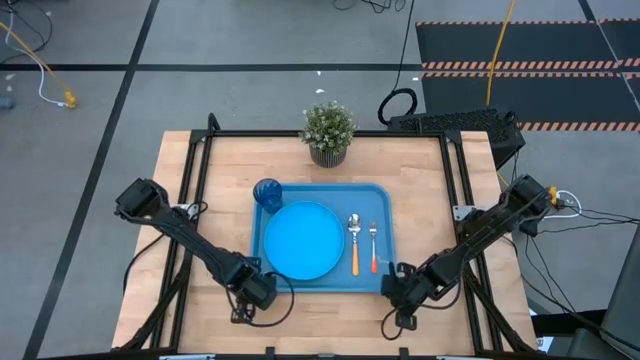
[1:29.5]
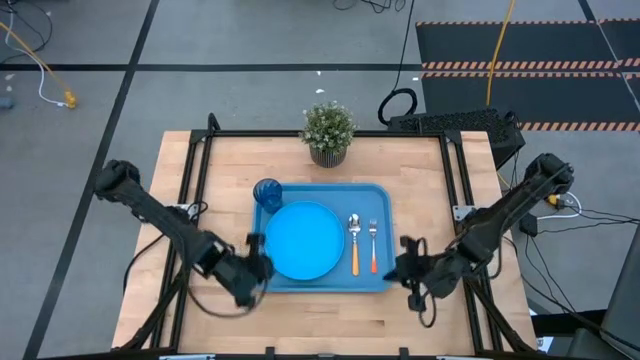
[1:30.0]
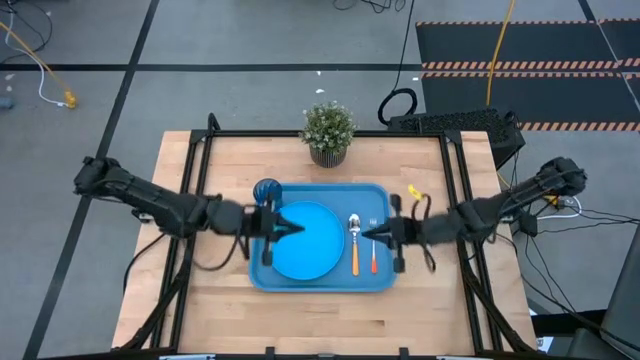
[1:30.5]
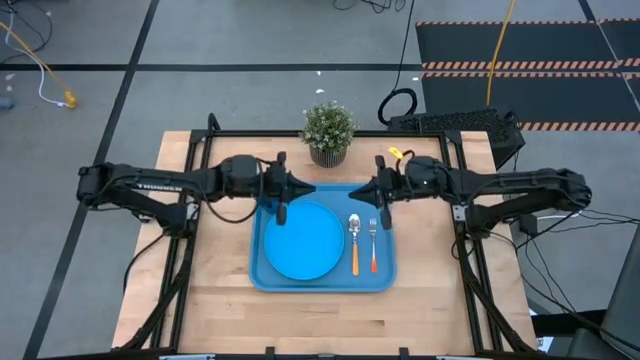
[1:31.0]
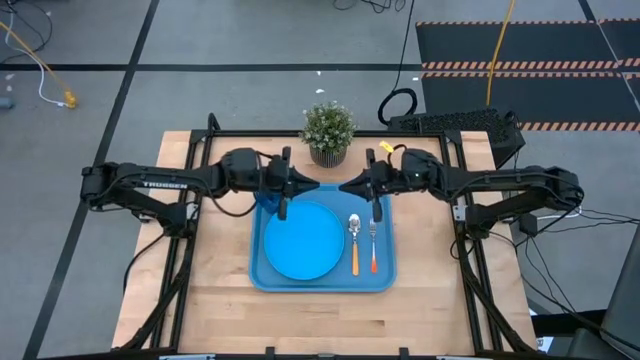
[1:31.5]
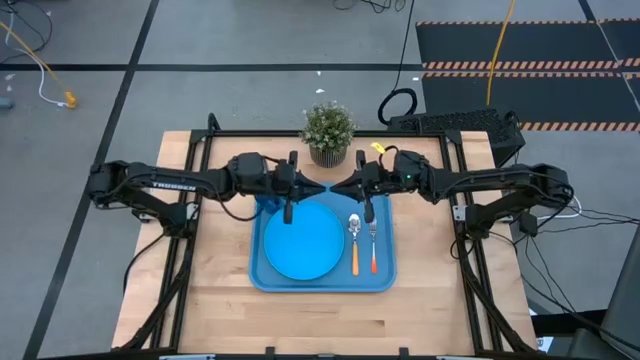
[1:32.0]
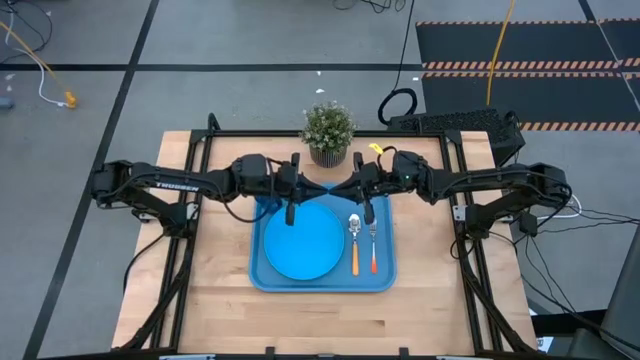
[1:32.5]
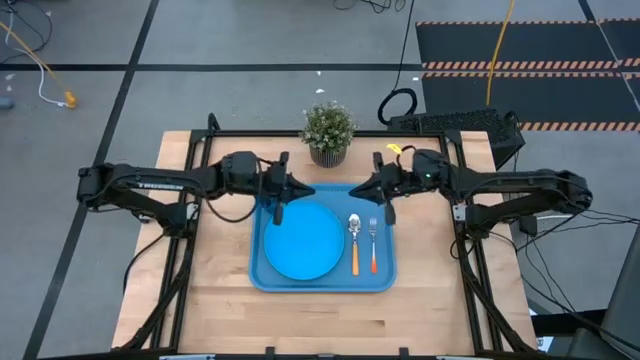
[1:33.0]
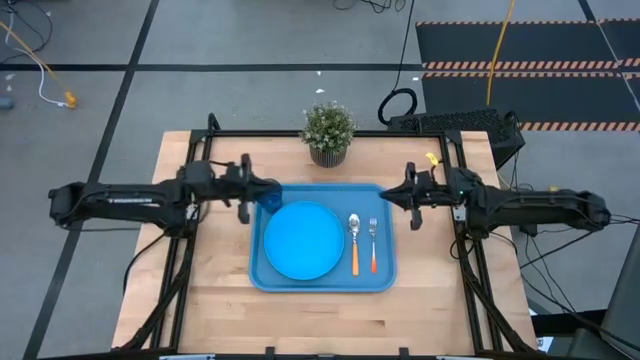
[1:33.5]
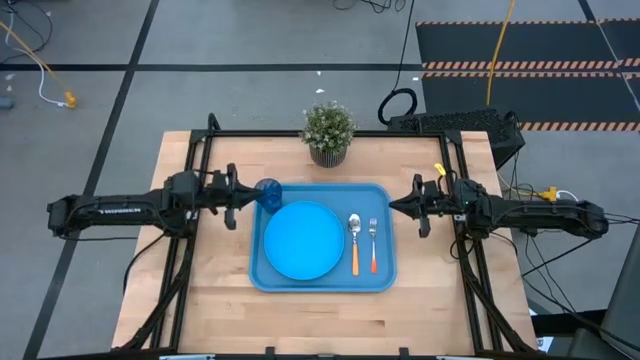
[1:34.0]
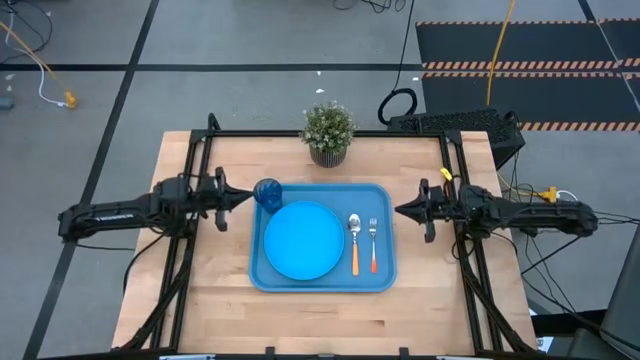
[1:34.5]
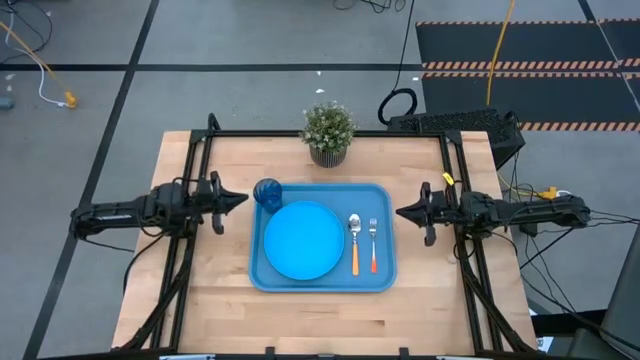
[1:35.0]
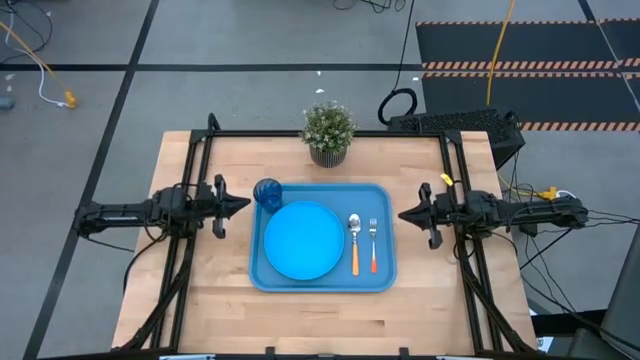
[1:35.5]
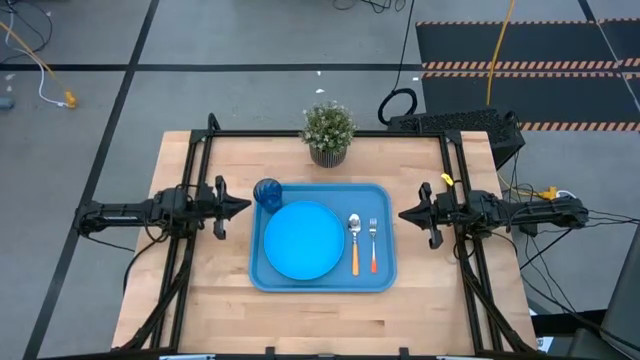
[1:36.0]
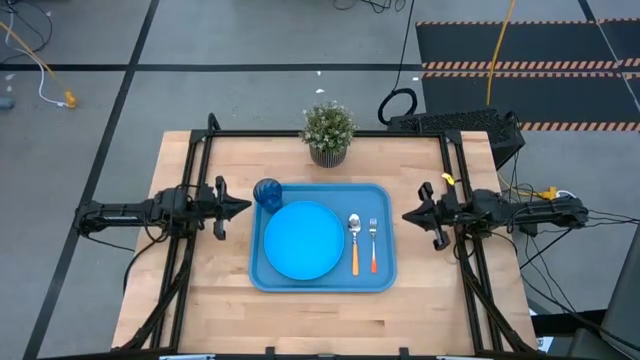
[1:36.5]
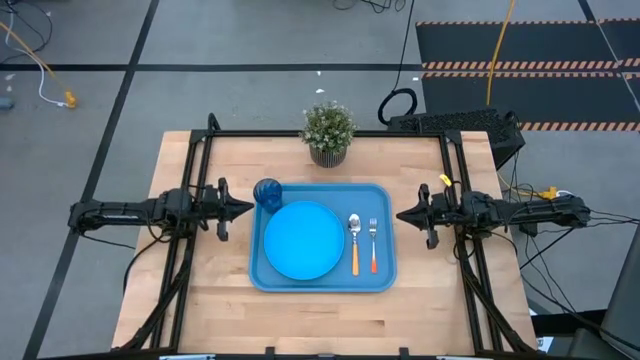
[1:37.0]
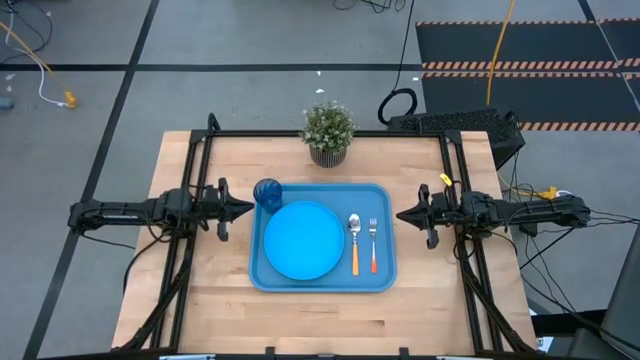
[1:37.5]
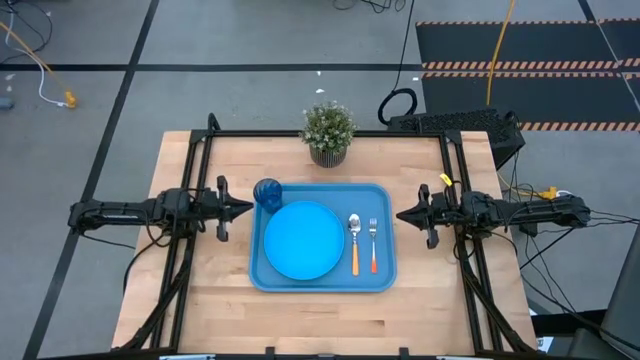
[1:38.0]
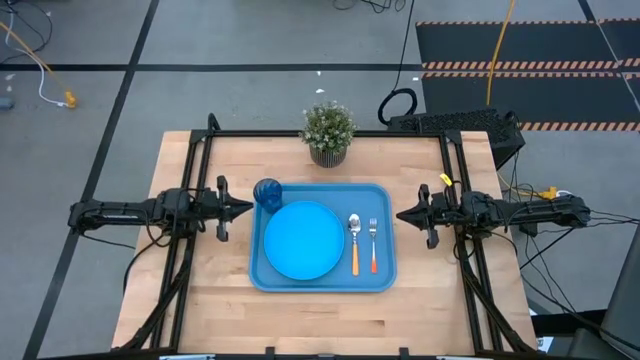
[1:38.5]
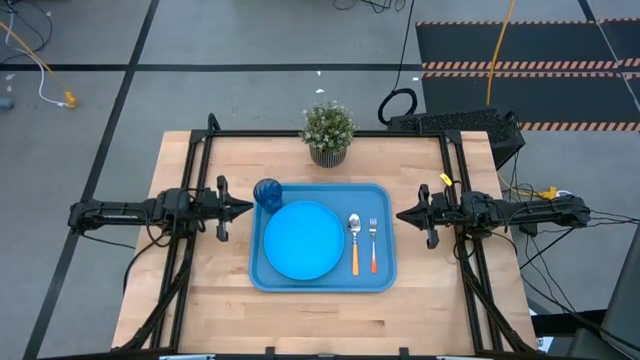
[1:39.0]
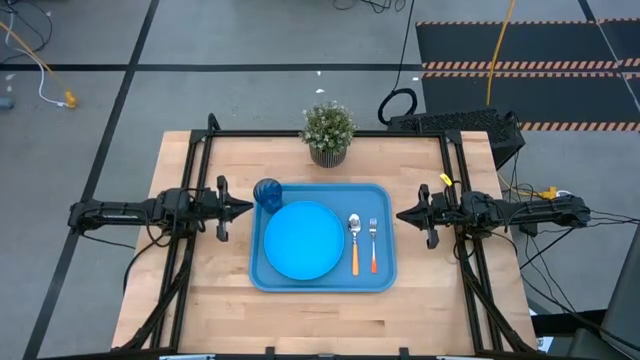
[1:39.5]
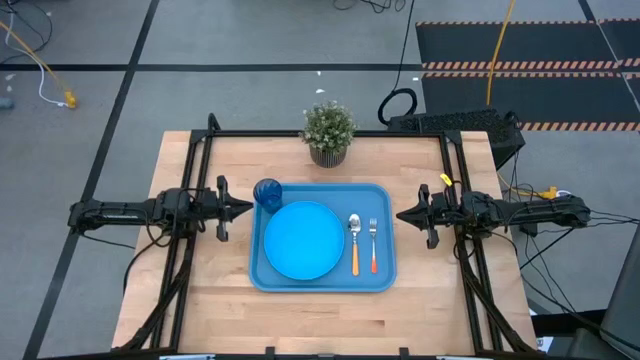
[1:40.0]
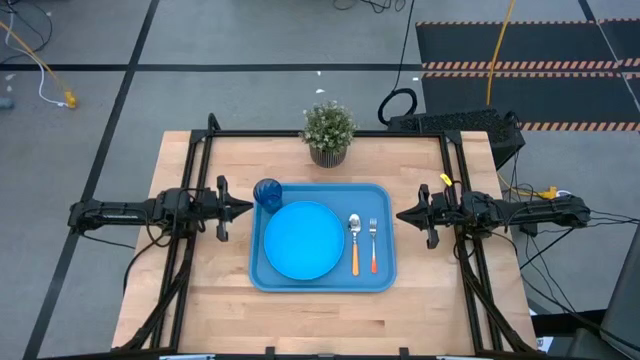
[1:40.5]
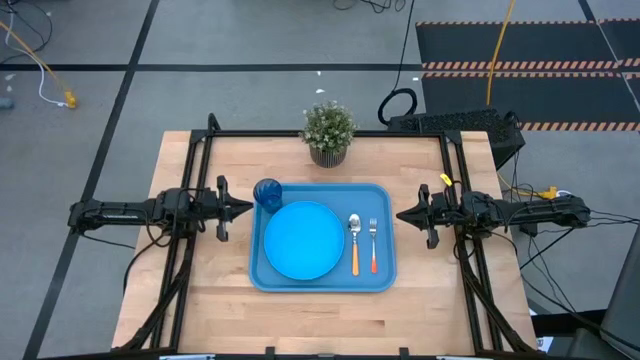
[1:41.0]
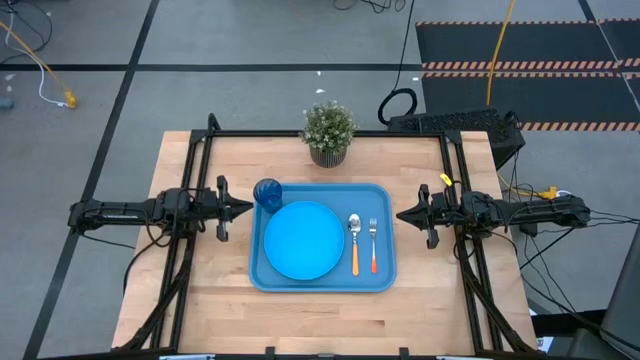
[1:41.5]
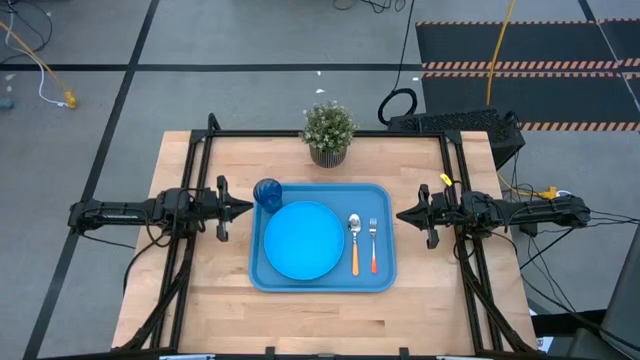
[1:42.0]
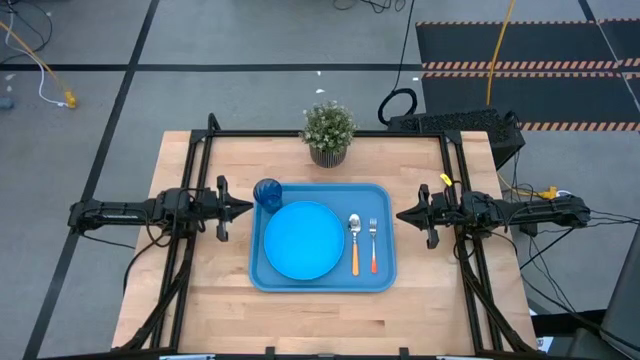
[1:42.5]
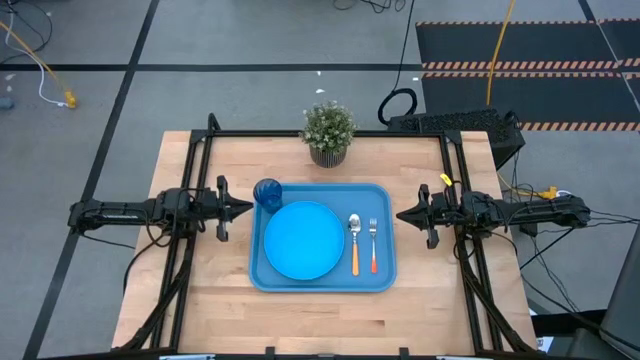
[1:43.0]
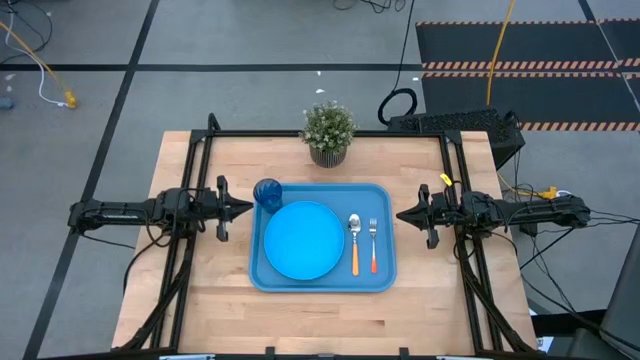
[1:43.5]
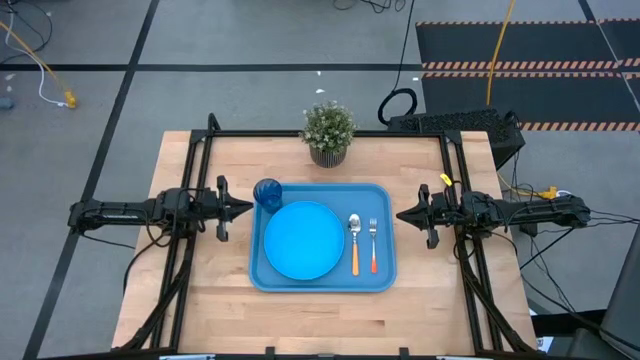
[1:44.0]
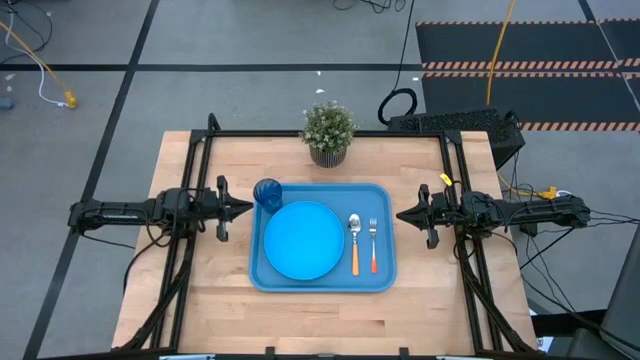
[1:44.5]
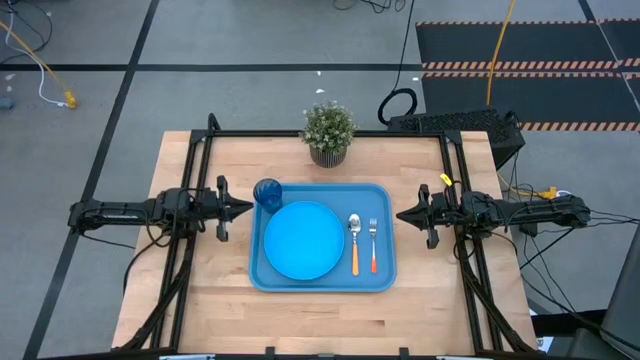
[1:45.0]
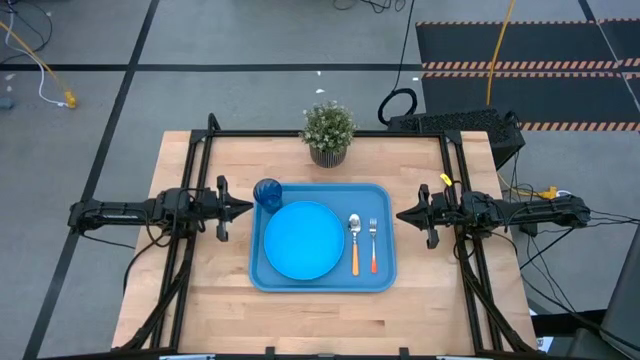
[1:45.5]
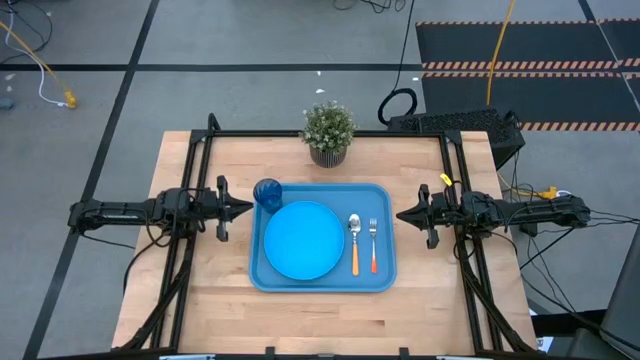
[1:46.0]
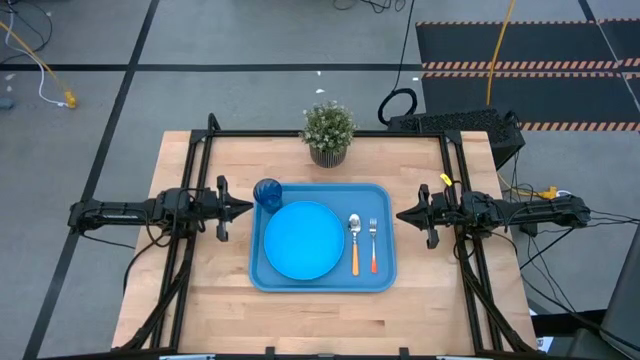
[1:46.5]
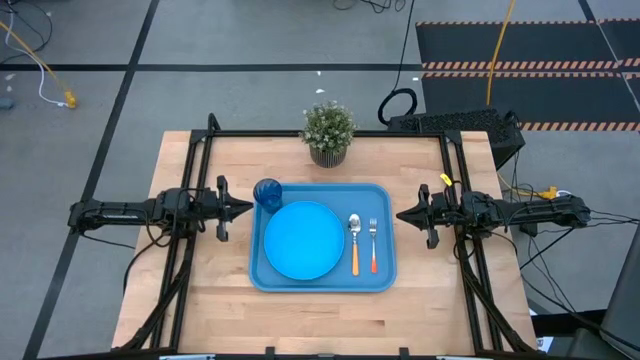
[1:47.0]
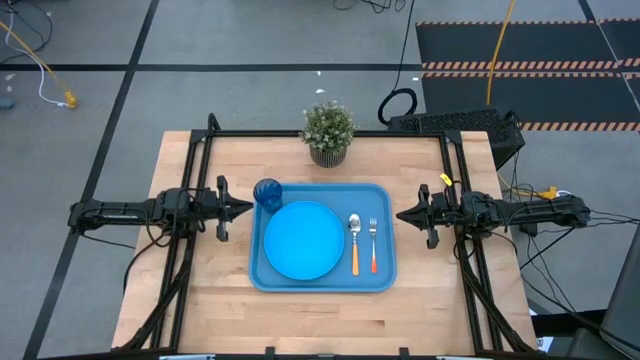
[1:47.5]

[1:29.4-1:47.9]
Task: Pick and place plate/cup/fork/spoon on tray
Return to Home Position
